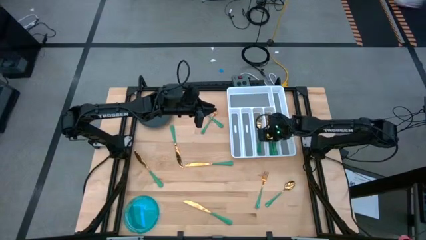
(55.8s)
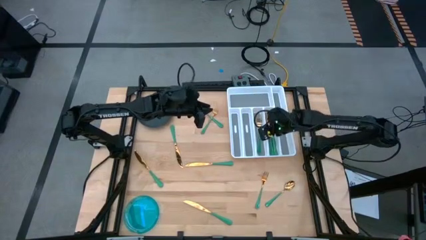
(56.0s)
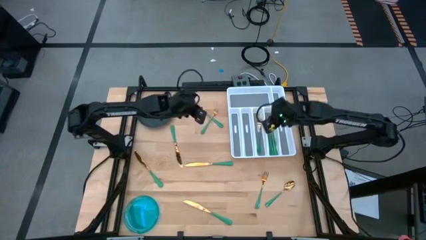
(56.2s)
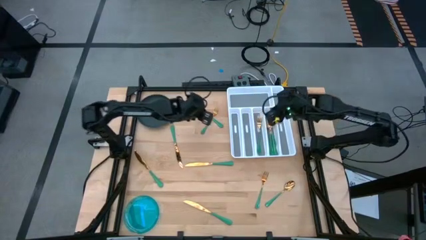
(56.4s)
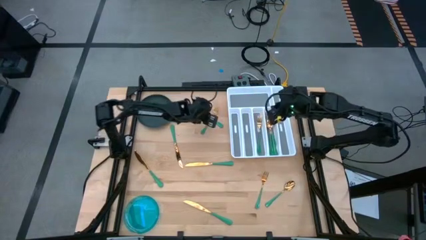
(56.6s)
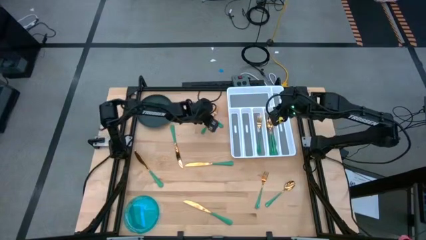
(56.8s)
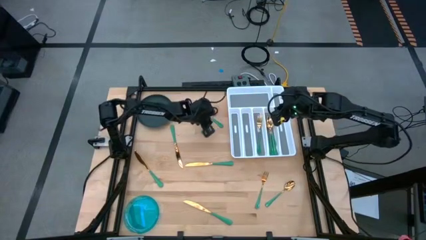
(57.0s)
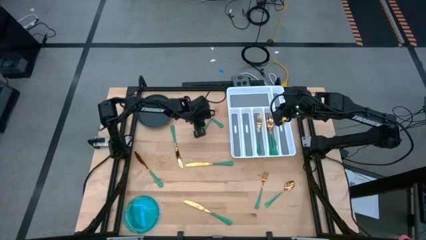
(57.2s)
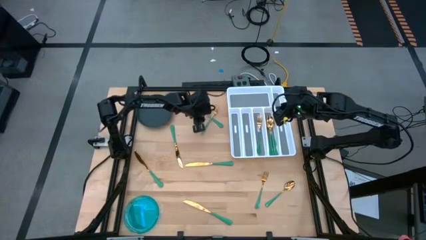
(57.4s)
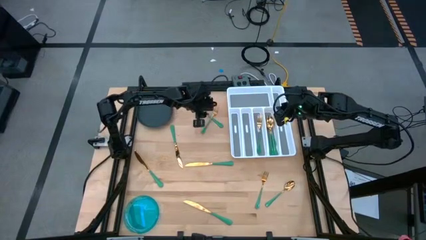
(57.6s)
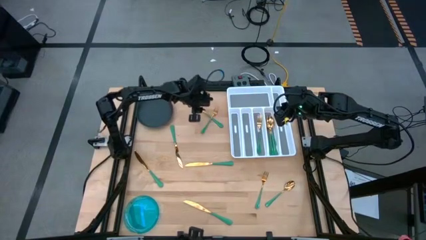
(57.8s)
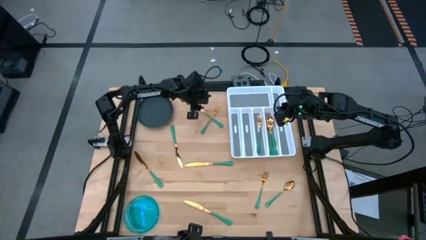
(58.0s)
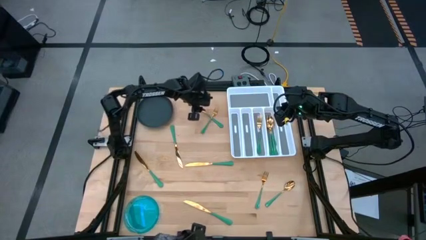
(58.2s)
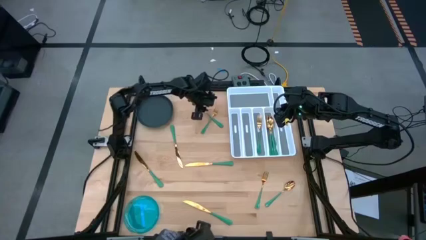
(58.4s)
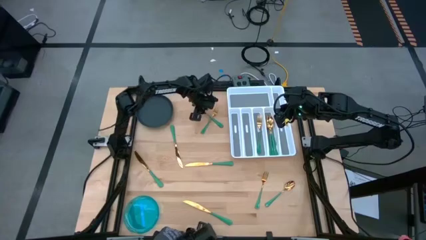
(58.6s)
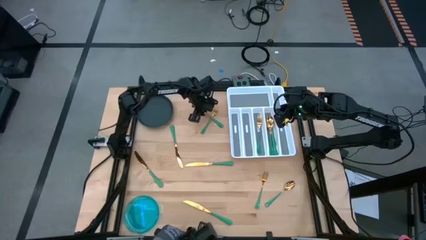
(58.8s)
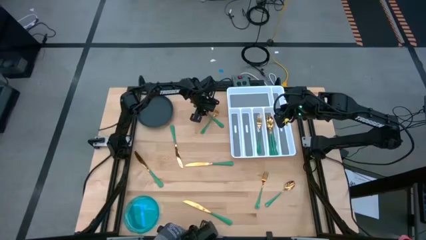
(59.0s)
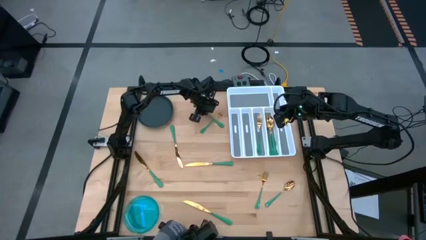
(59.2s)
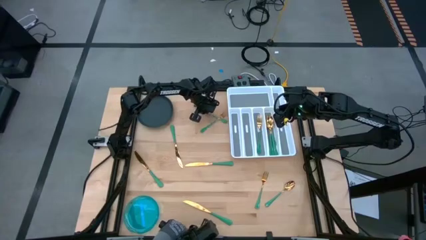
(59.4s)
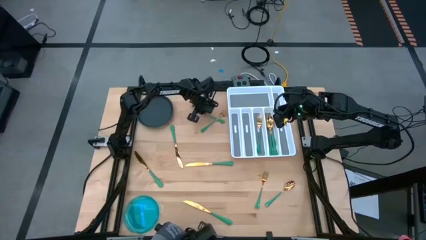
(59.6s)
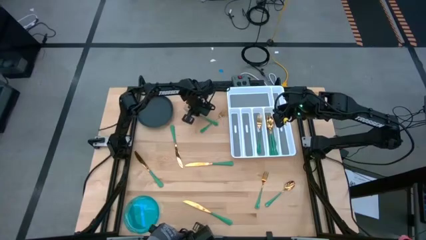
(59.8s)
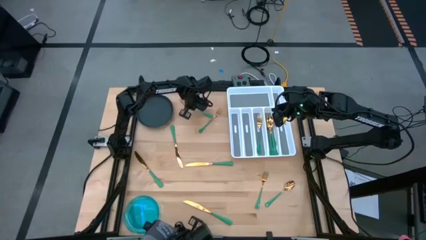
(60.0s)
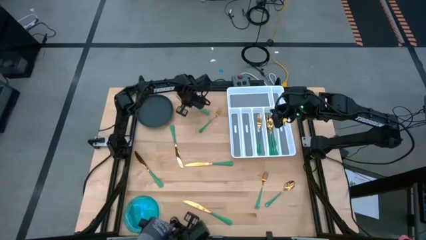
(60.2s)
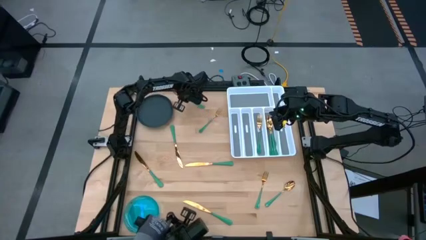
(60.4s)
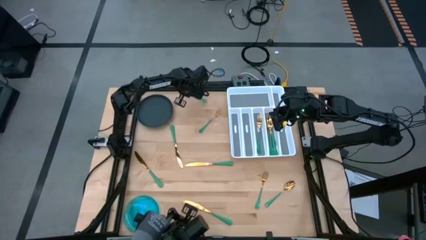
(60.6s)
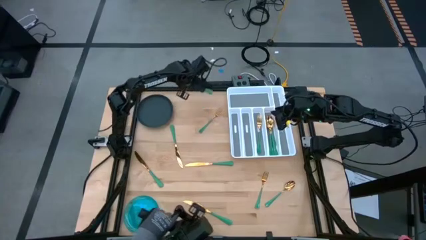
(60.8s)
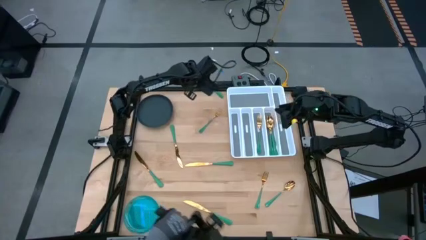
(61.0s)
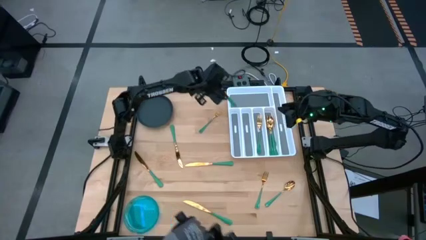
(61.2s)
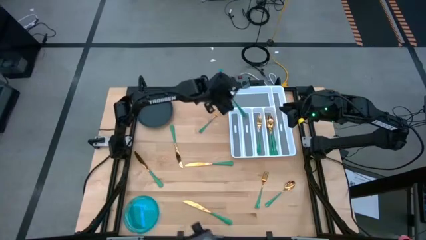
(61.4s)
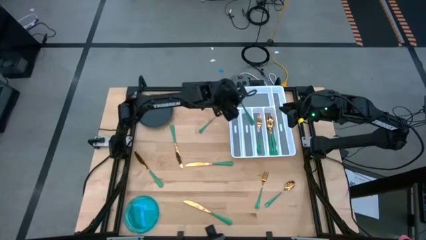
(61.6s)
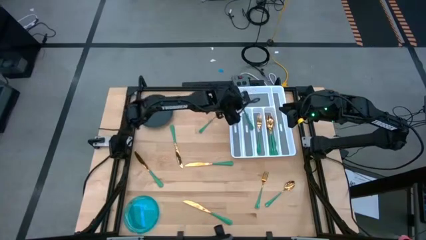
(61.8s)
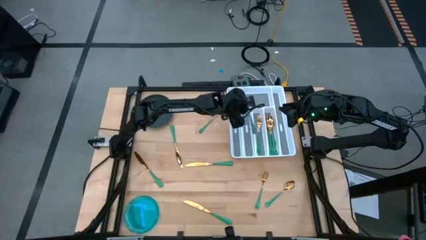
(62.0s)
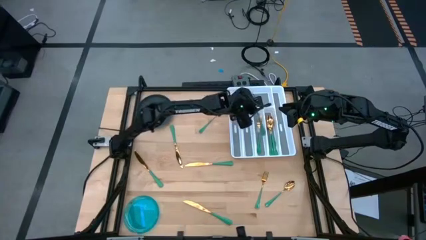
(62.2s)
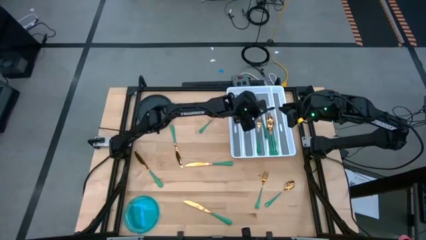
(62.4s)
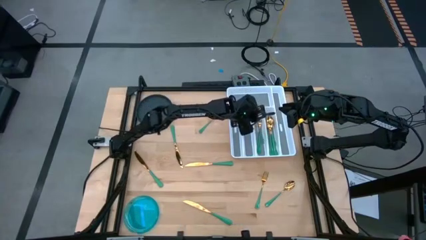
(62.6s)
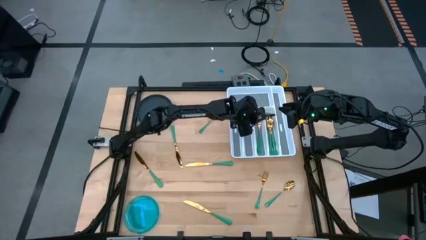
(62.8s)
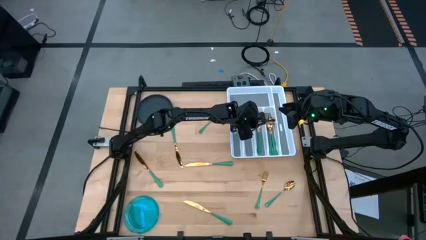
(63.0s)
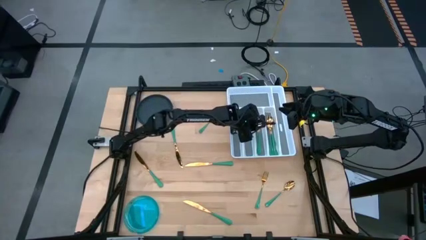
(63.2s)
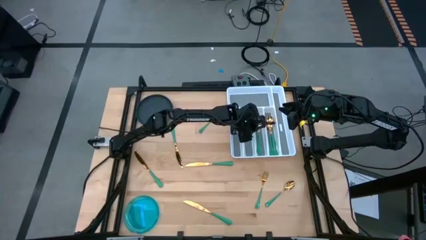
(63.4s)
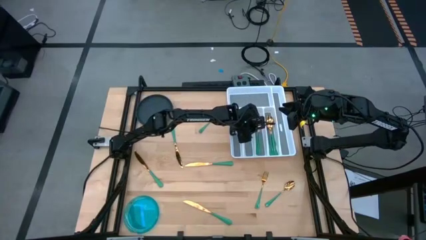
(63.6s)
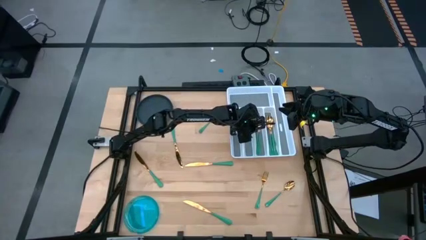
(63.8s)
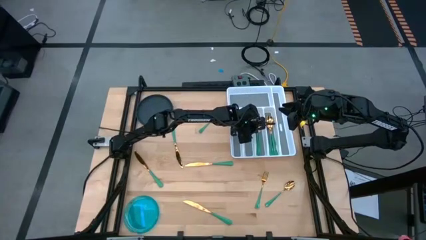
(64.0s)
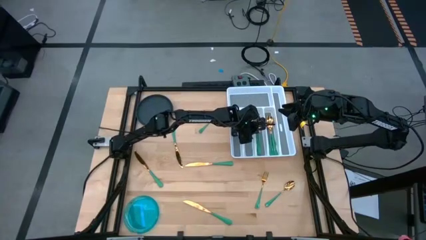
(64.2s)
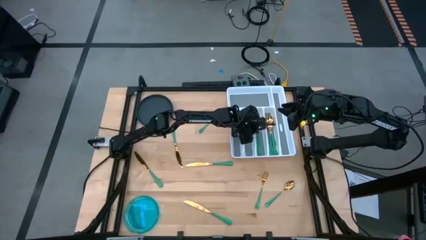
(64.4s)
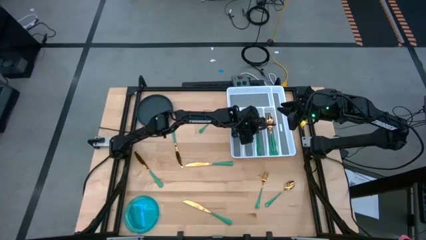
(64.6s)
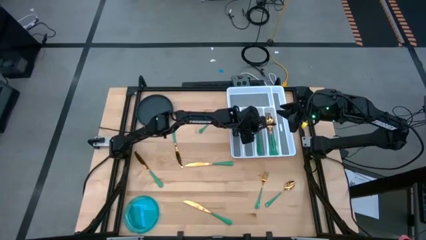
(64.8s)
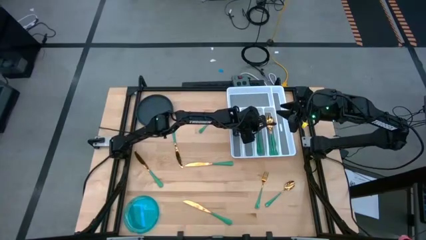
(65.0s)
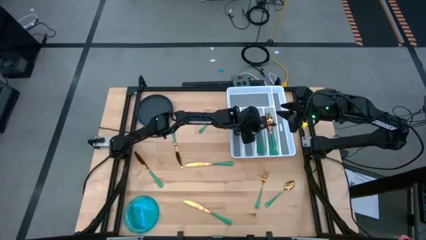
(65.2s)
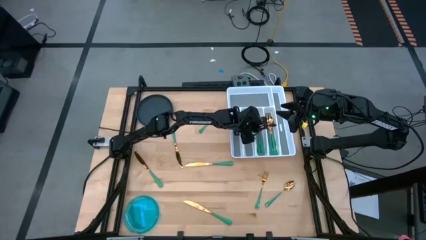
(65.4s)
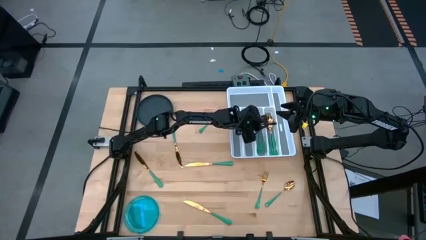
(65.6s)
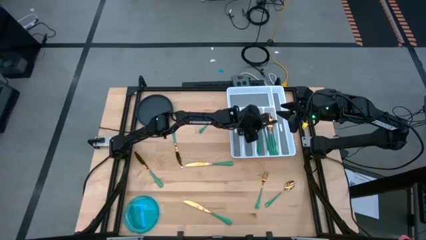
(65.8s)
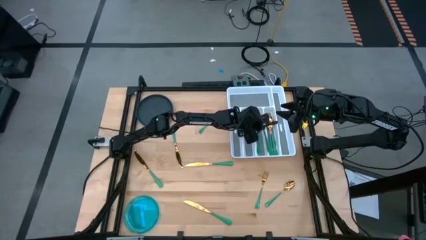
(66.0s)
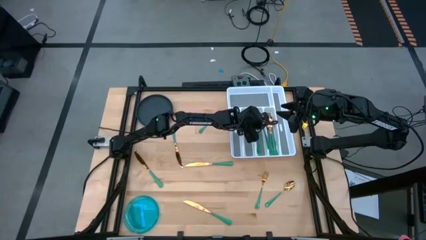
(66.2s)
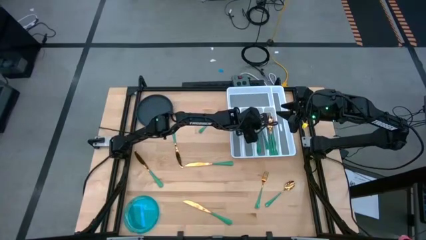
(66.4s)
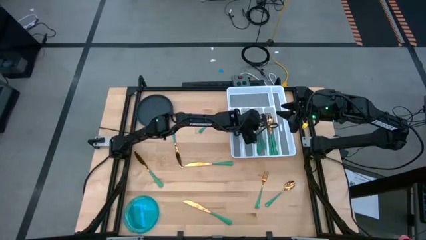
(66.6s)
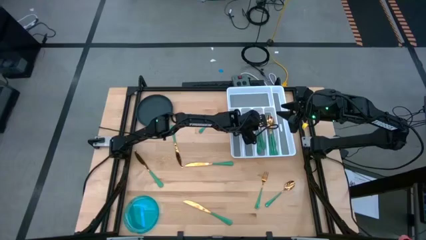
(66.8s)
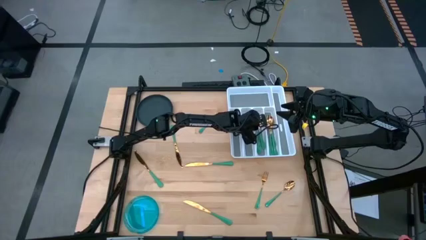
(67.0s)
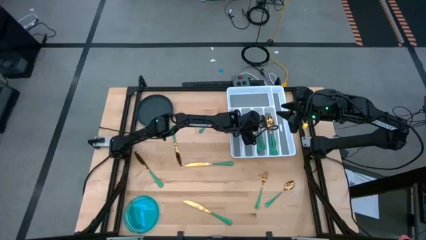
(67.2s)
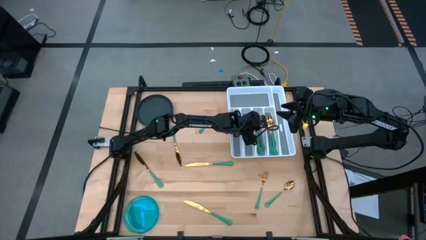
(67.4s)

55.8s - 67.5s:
Task: Sort silverware
Put the green fork into the white silverware organizer

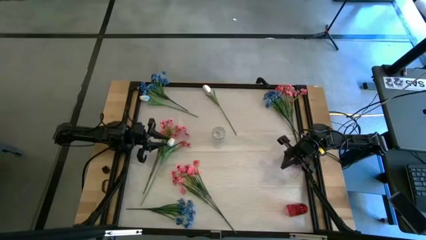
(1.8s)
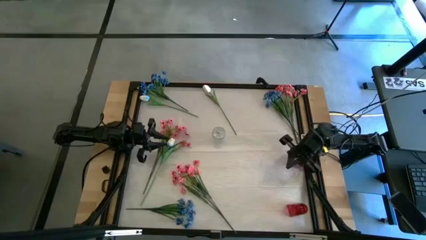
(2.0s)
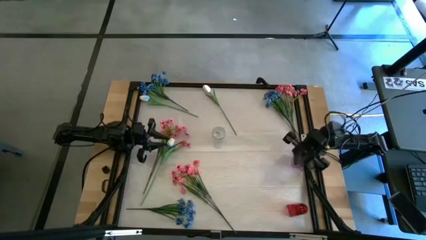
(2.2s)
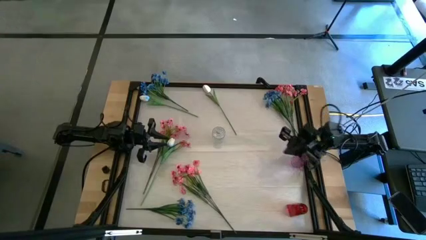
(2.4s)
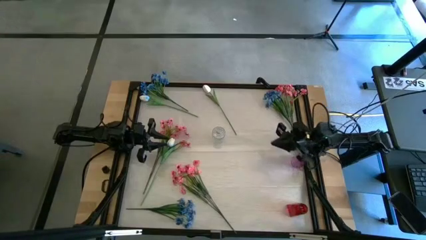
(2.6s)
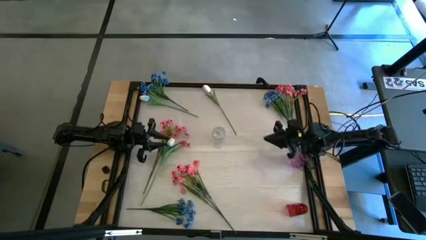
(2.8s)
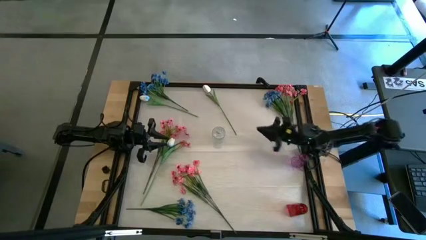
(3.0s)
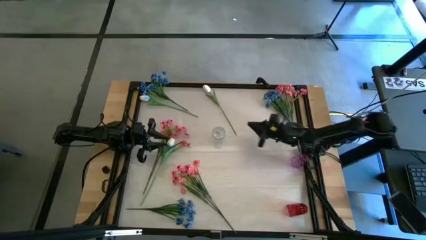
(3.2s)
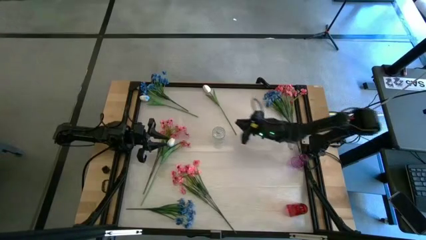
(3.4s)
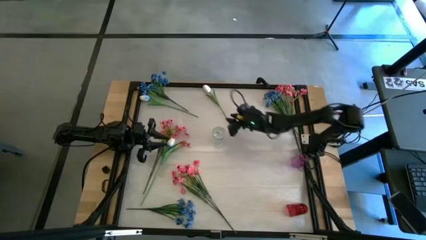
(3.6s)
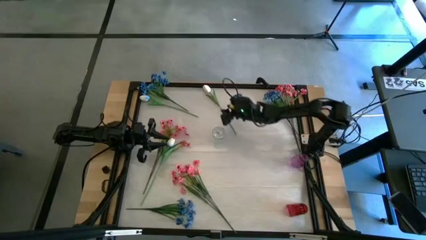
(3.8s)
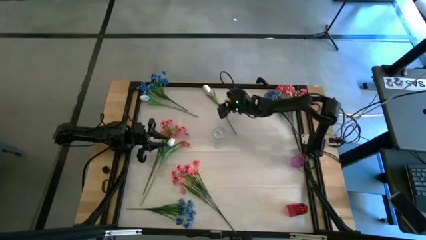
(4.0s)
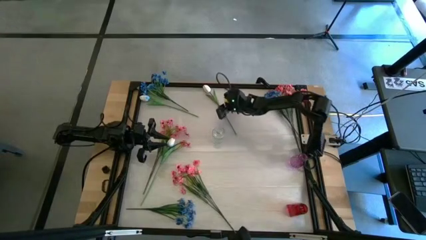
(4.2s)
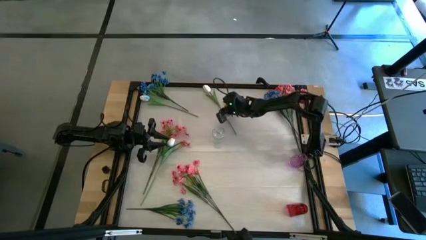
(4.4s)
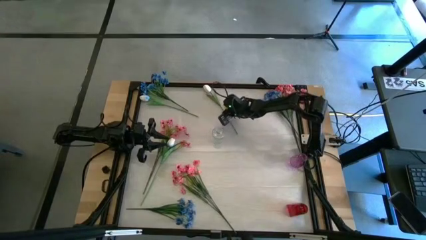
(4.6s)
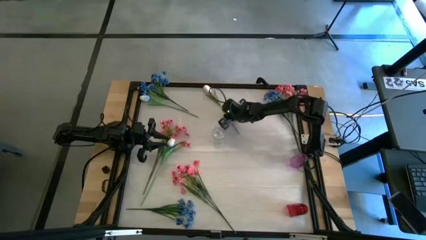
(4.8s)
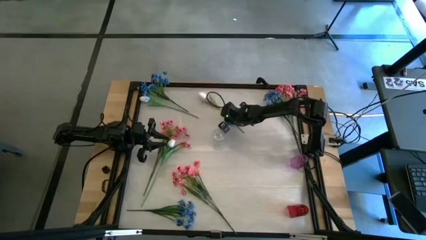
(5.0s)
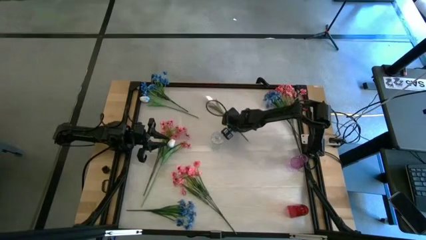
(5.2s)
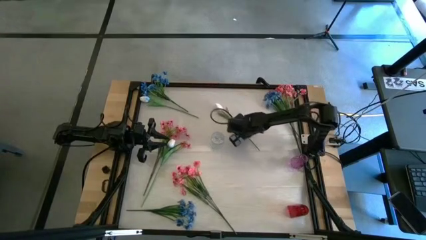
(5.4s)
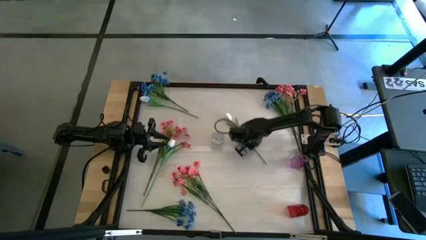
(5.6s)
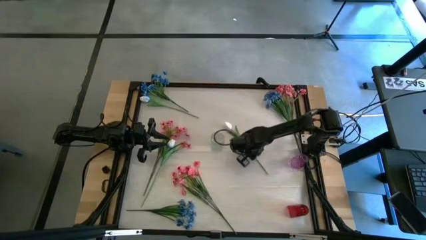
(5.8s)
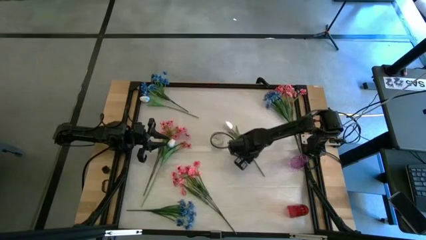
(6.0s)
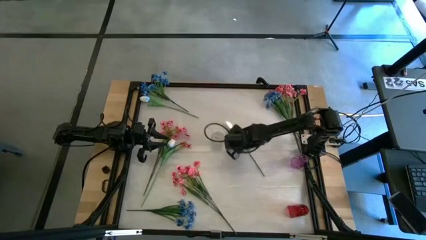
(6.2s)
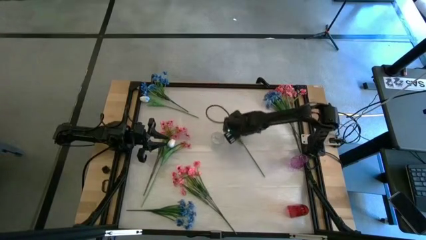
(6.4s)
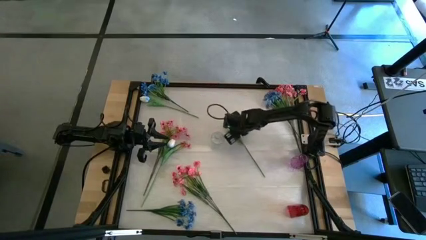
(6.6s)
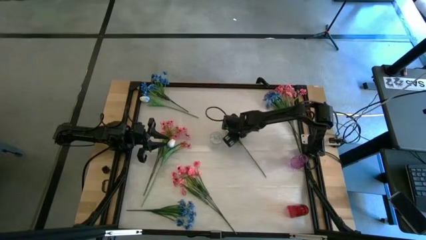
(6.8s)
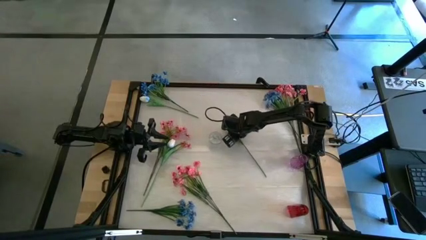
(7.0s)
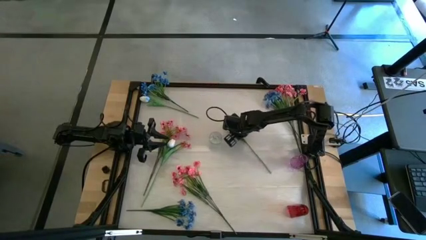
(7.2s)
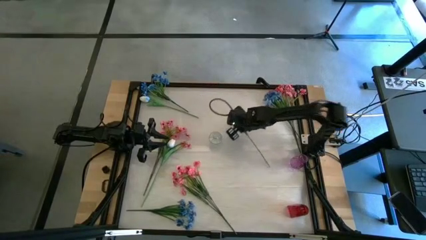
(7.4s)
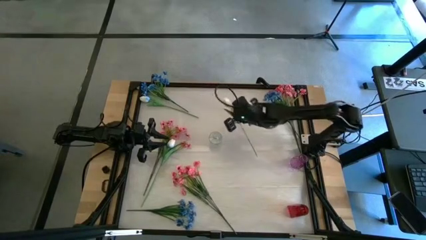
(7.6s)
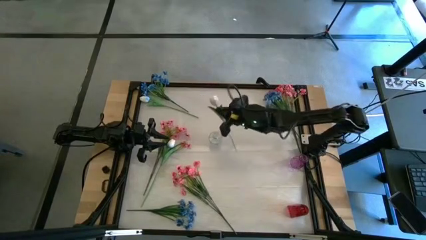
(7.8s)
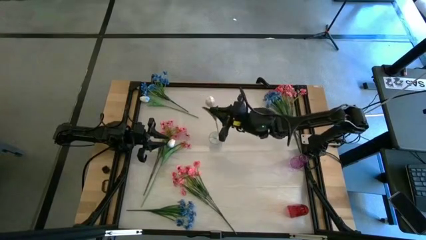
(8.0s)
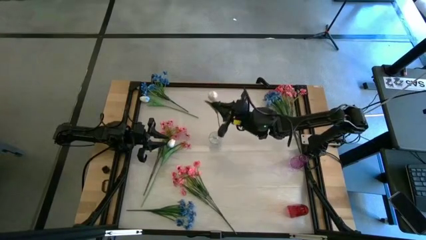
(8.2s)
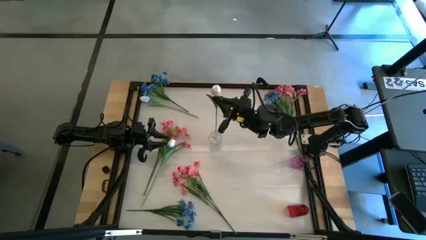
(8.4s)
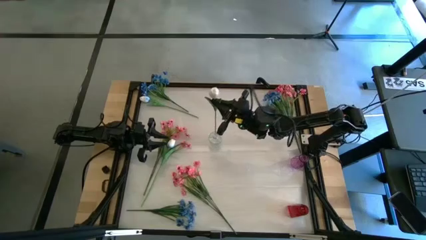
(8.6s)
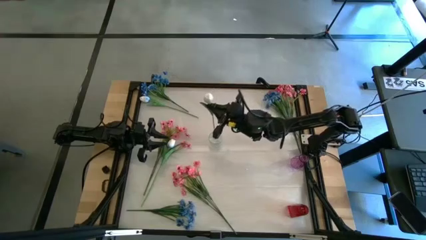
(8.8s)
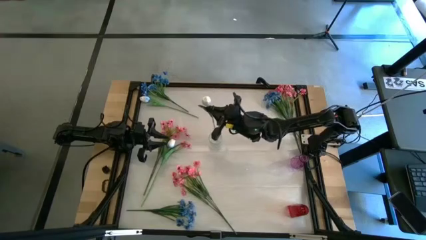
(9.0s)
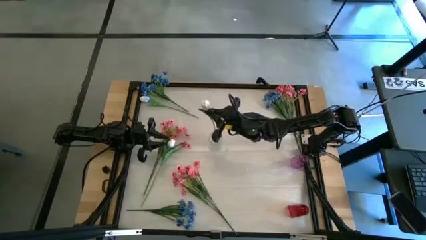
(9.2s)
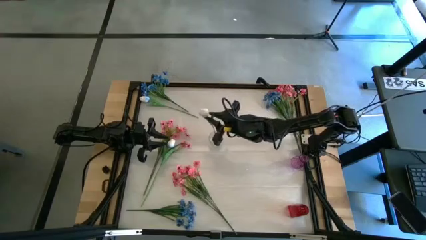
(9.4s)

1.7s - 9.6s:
Task: Sort flowers into vase by color
Put the top right white flower into the transparent vase
